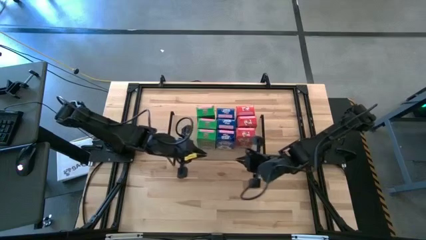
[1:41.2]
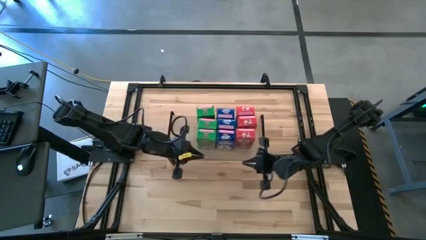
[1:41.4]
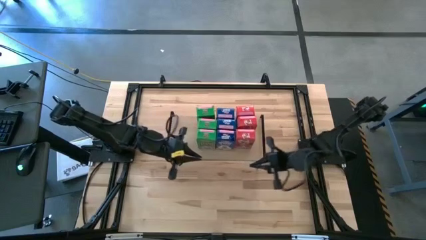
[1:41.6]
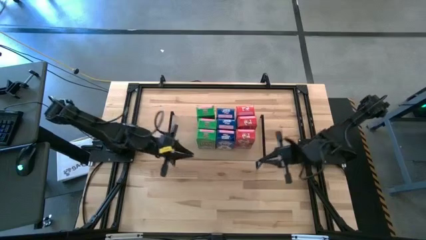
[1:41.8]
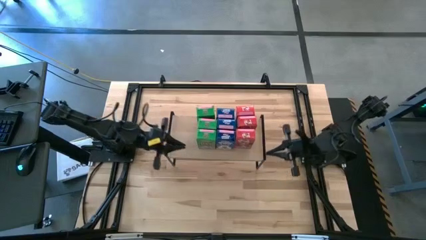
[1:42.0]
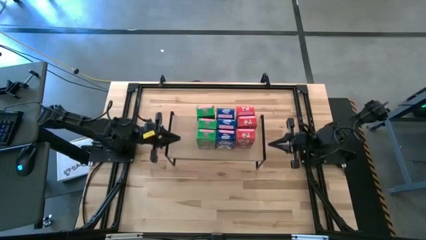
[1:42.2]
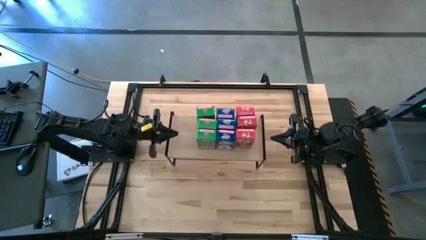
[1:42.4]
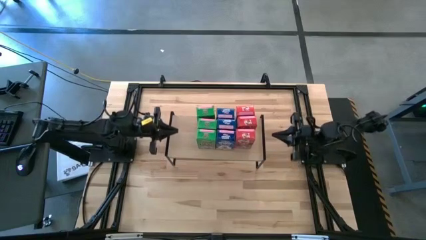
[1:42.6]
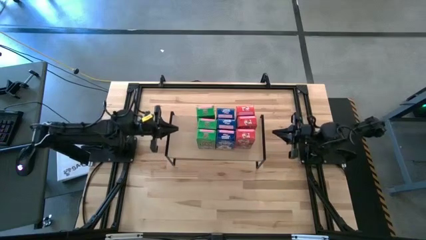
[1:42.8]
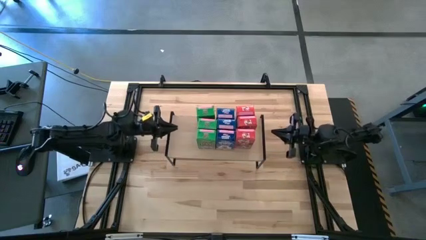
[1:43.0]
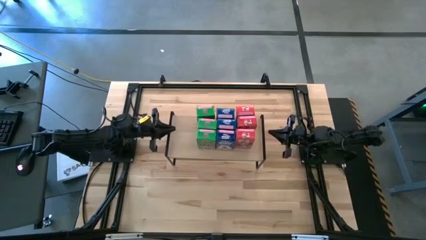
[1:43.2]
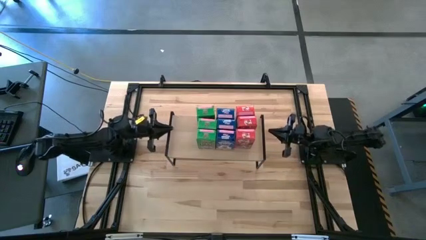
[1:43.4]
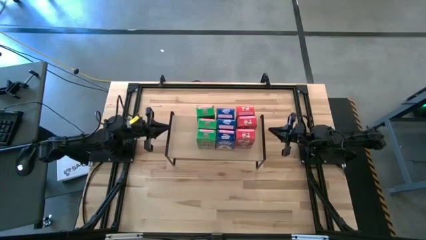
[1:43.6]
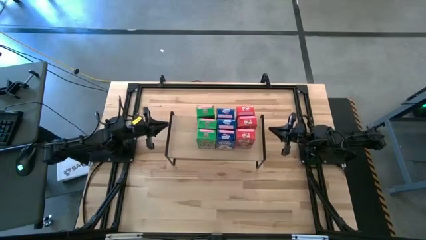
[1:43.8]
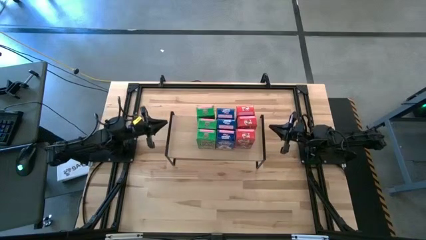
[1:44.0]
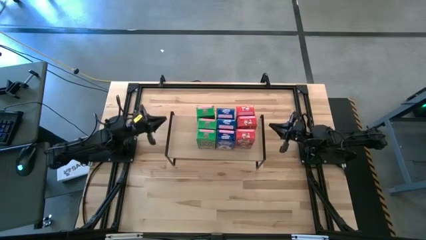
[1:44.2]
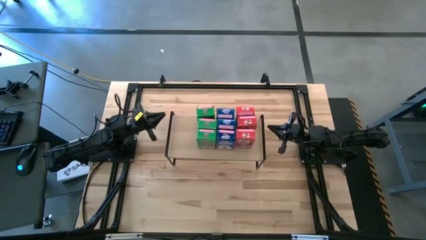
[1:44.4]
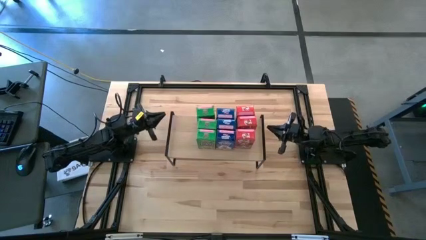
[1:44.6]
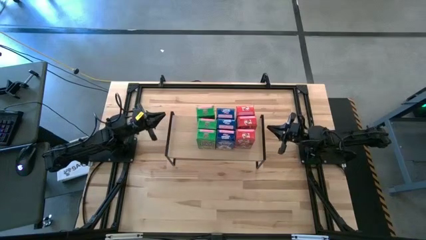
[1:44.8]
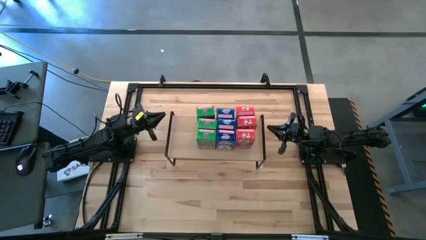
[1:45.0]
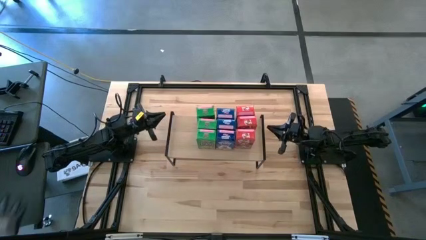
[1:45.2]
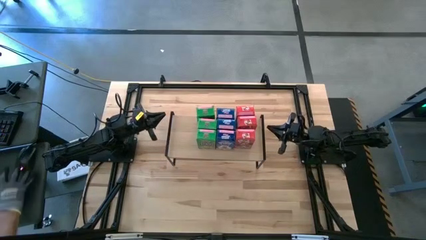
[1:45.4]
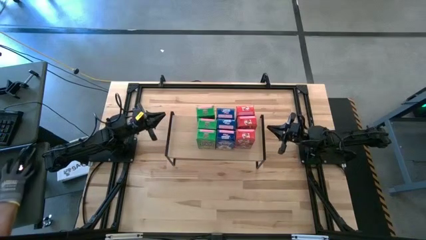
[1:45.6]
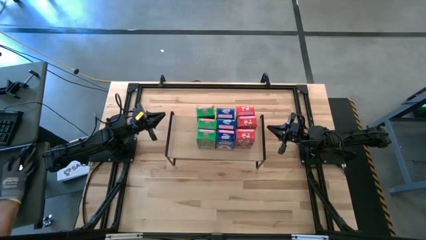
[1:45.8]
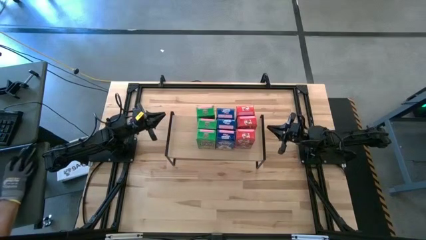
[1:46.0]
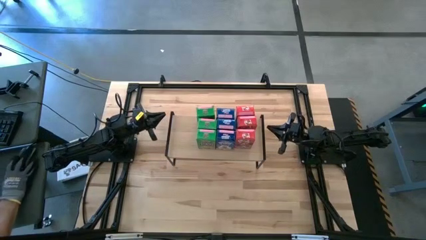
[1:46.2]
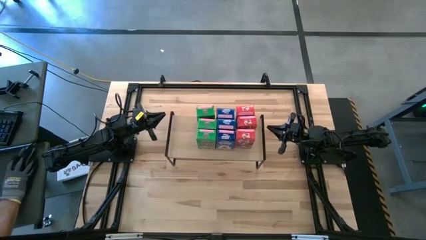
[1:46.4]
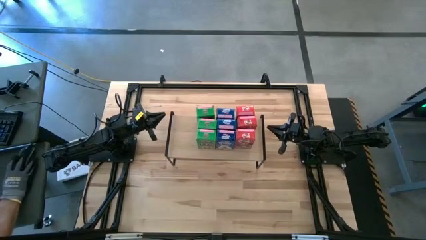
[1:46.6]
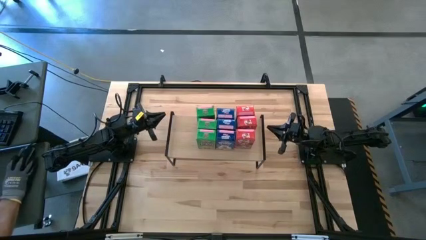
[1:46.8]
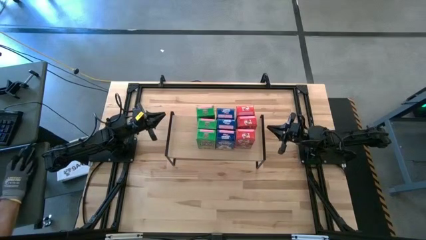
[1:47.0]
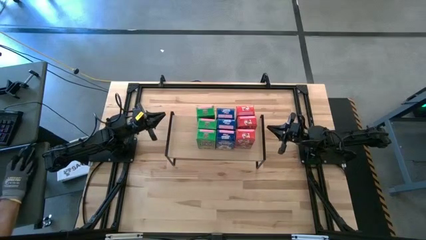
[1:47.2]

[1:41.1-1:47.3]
Task: Stack cereal on shelf
Return to Home Position

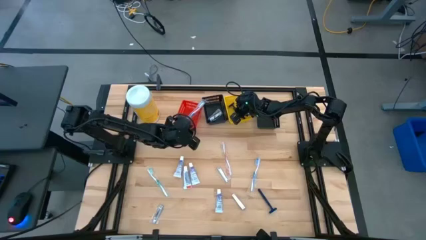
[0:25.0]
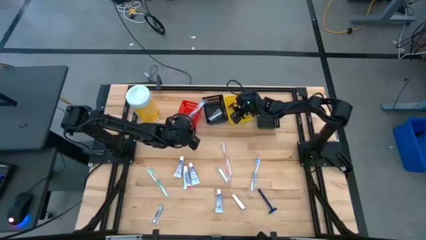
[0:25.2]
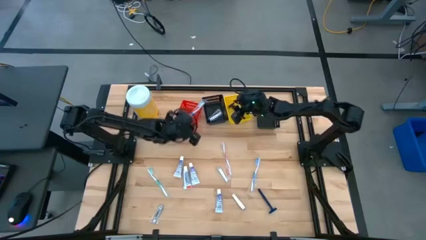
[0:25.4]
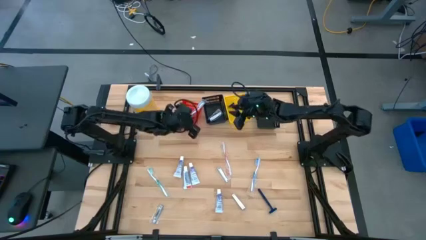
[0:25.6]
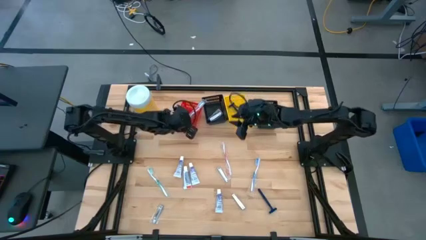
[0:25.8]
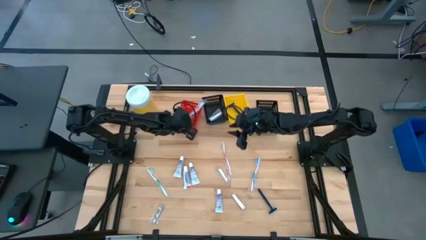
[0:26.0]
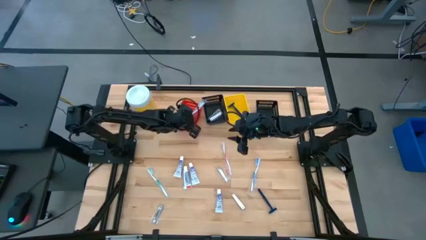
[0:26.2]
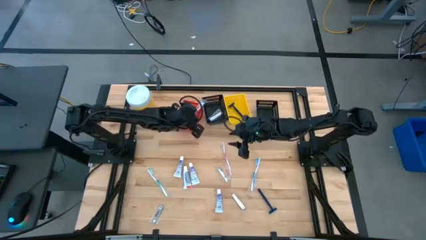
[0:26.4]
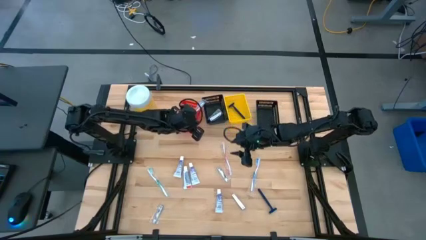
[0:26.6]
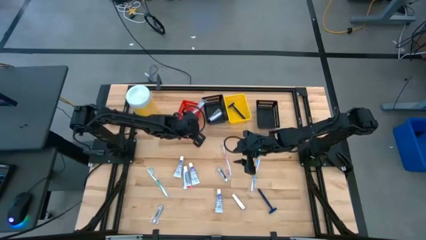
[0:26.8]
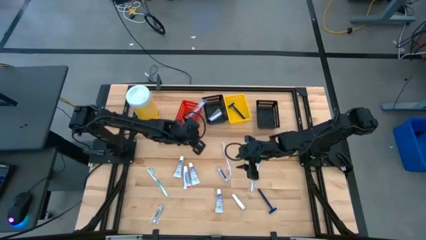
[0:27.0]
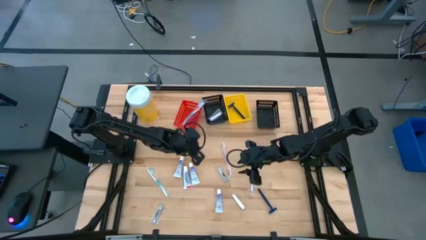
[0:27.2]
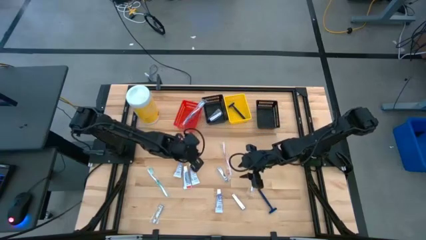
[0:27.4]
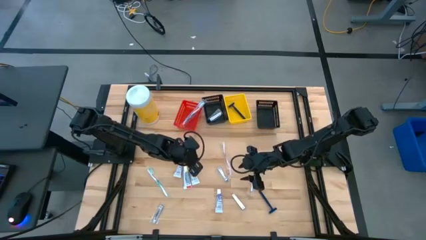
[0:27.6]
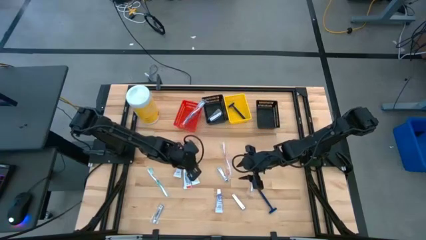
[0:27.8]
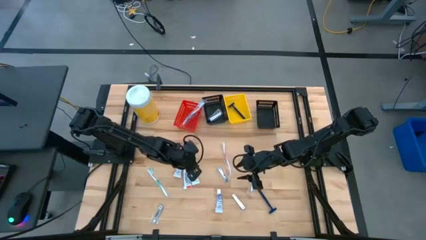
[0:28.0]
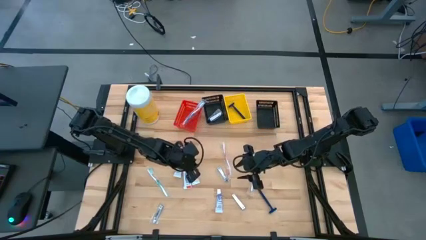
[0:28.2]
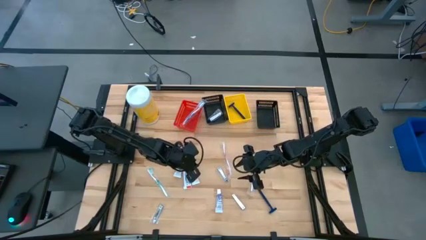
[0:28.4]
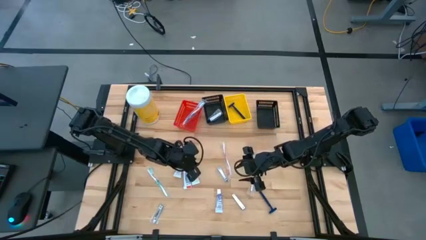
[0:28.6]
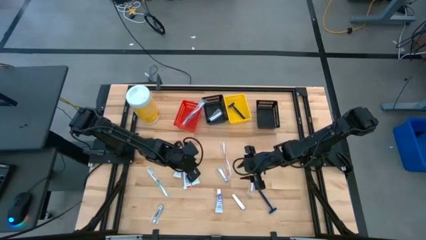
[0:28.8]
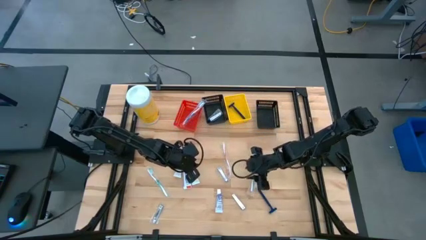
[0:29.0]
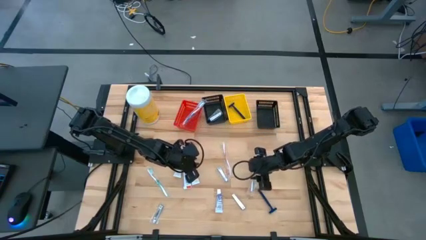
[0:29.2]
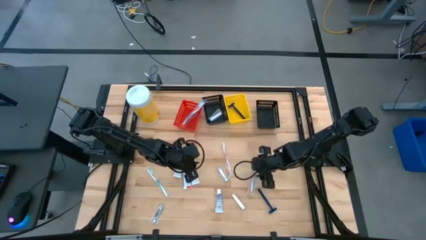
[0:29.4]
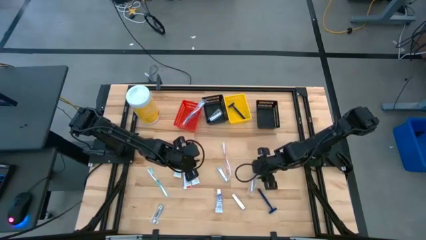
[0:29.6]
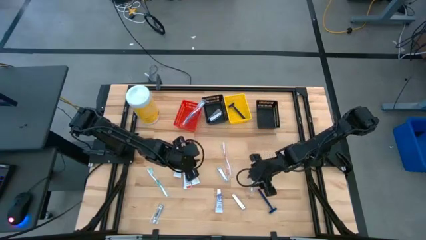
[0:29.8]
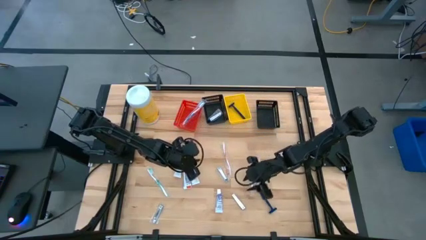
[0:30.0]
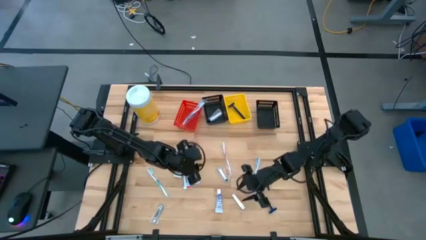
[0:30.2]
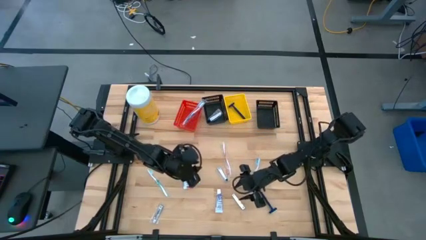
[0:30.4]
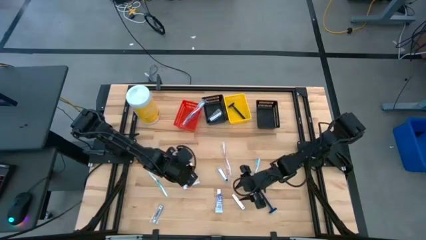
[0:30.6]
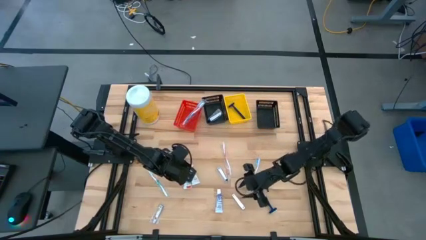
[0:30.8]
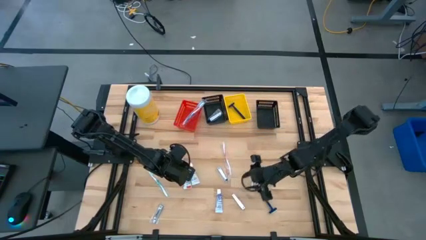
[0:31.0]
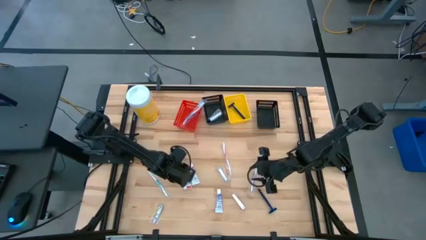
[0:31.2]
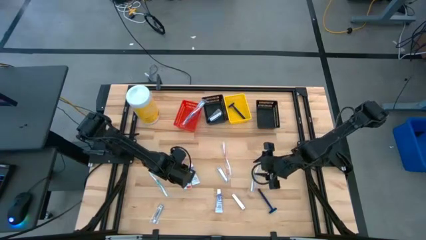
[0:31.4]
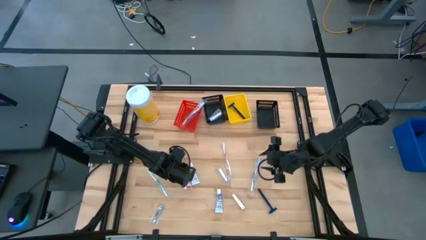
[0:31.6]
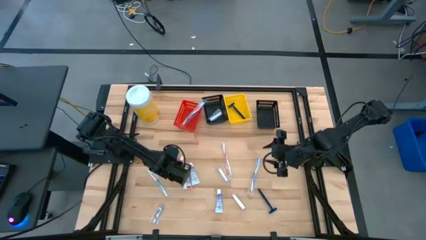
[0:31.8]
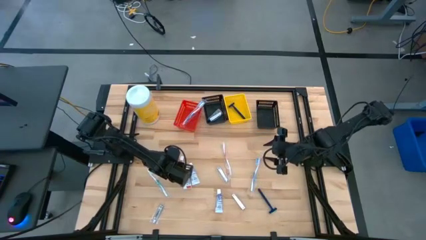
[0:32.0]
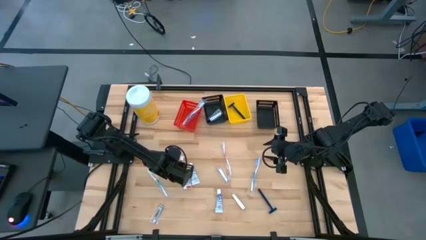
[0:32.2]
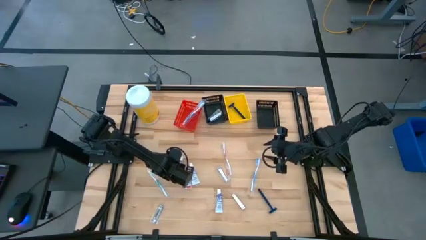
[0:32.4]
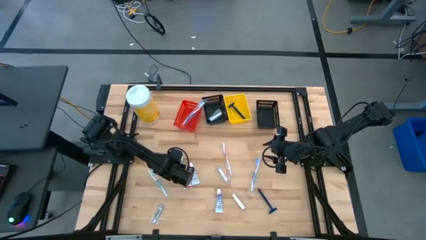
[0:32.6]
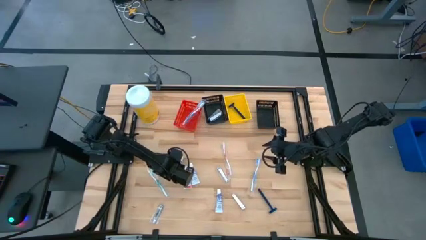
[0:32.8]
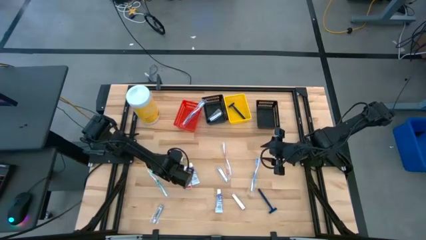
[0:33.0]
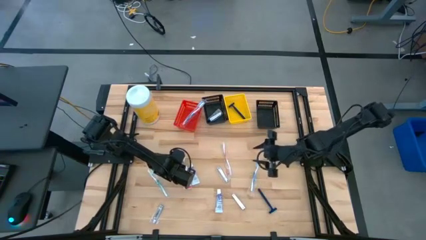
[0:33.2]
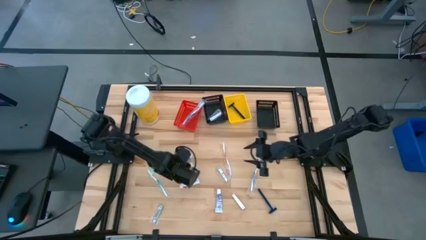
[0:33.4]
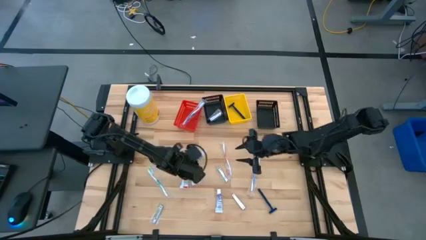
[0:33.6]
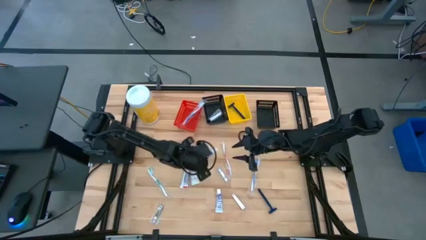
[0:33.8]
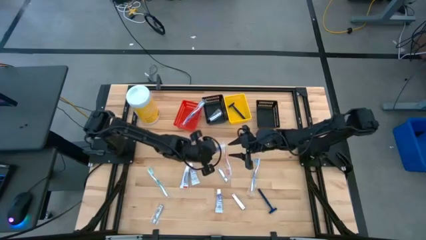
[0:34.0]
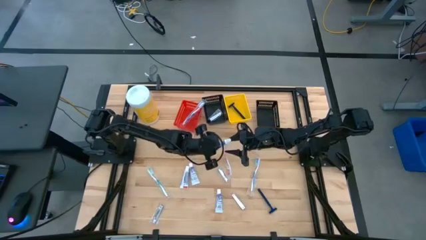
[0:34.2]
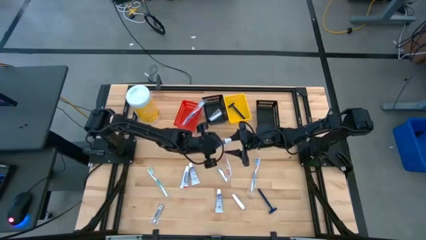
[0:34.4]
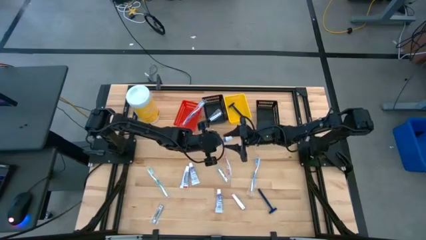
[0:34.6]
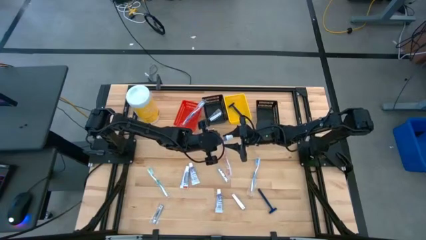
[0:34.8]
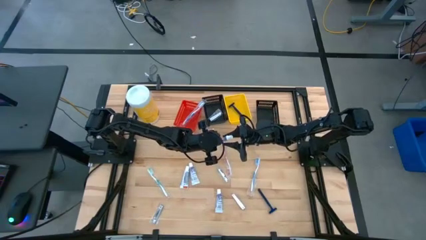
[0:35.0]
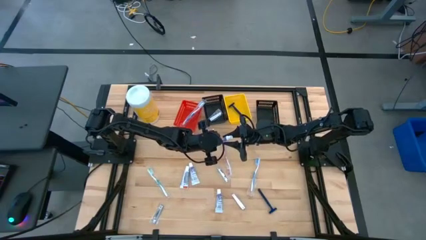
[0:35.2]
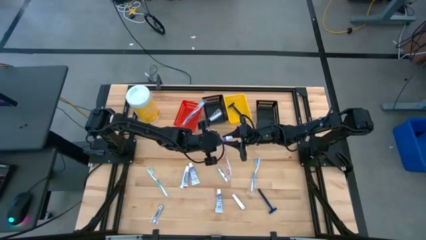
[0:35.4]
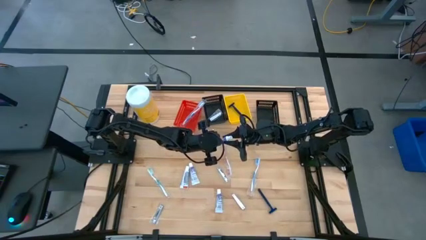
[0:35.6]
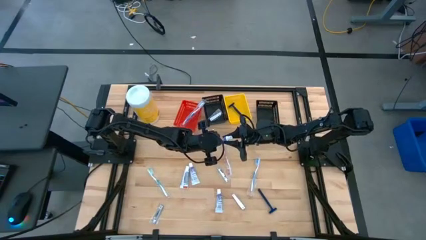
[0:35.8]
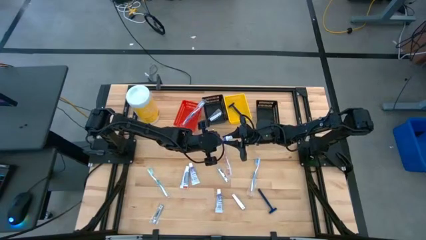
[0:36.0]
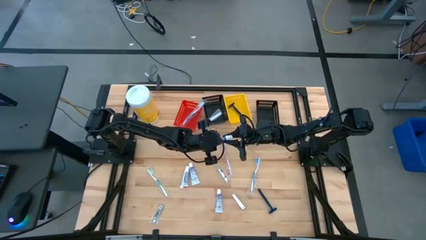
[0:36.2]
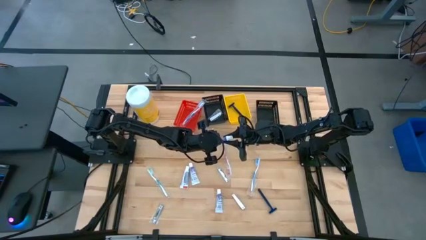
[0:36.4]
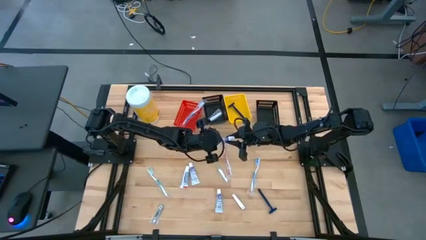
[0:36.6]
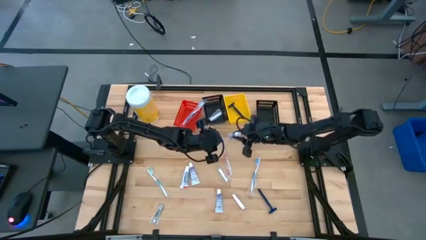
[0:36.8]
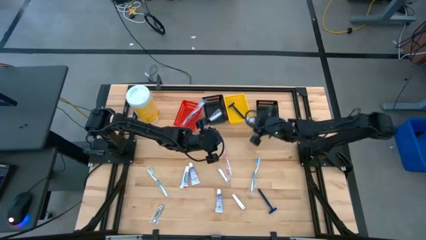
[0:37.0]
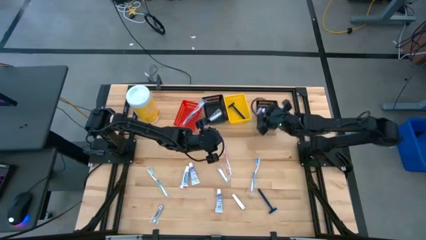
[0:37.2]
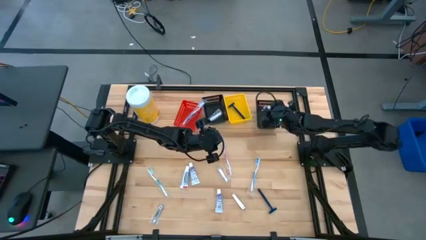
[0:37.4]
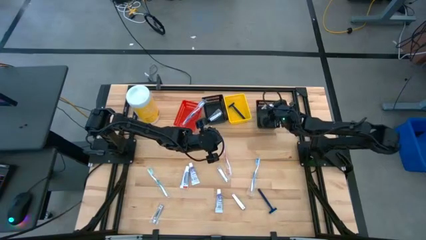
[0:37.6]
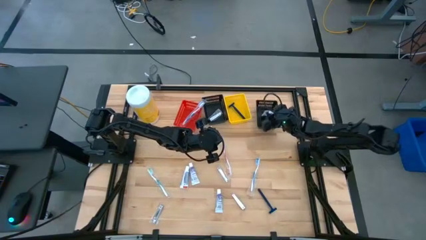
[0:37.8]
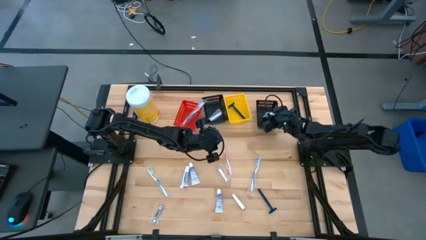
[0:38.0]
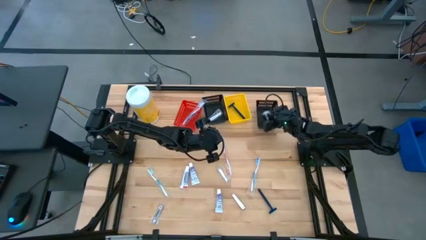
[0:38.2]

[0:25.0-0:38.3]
Task: Pick & Place Travel size toiletries
Put the purple toothpaste into the right black bin
